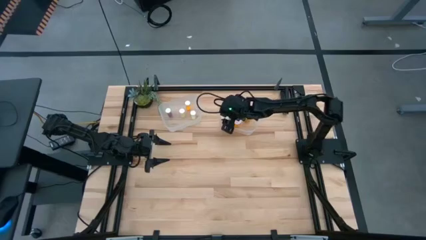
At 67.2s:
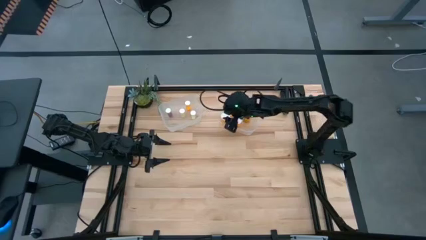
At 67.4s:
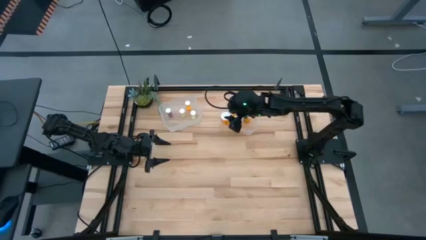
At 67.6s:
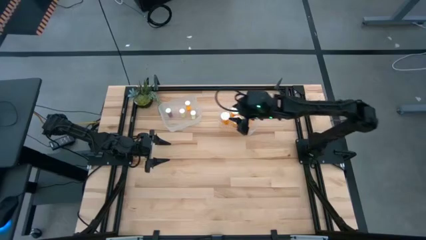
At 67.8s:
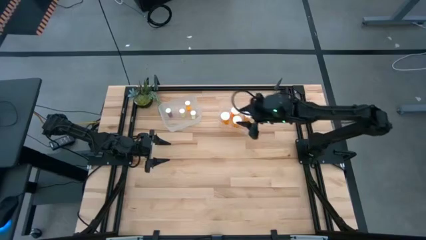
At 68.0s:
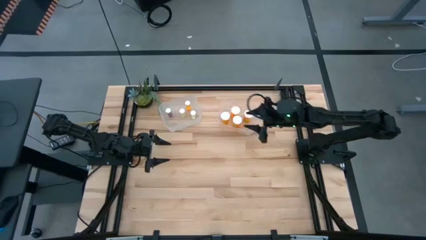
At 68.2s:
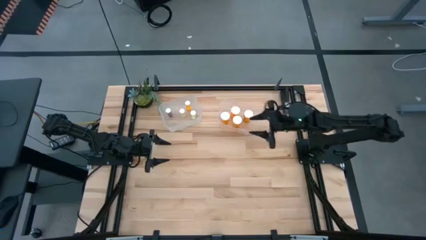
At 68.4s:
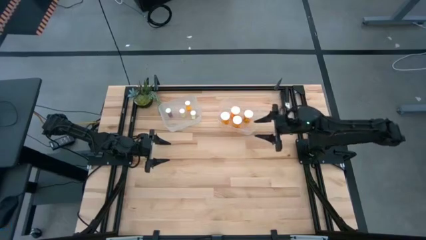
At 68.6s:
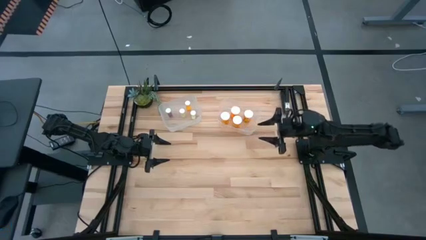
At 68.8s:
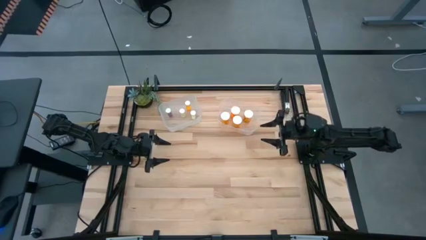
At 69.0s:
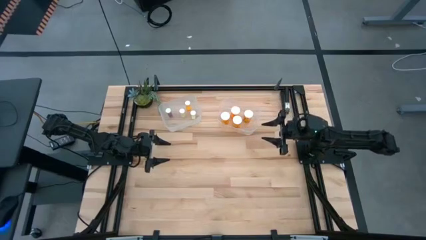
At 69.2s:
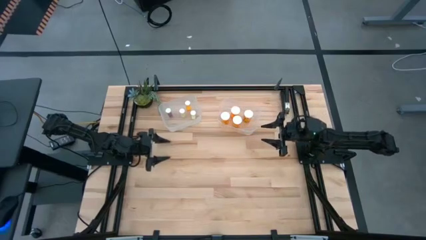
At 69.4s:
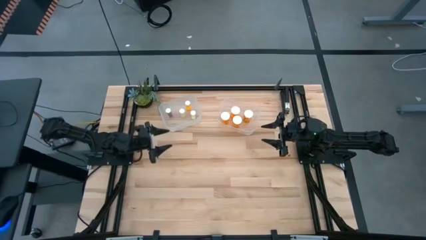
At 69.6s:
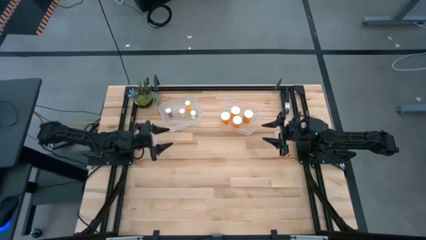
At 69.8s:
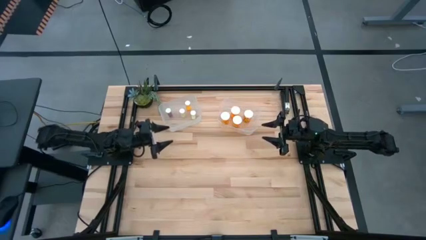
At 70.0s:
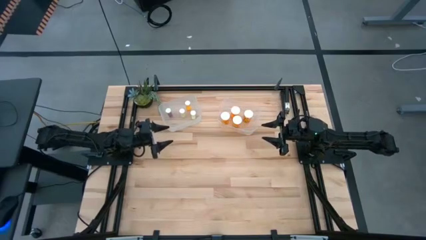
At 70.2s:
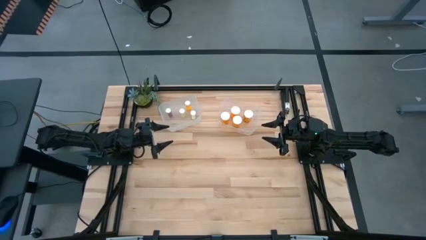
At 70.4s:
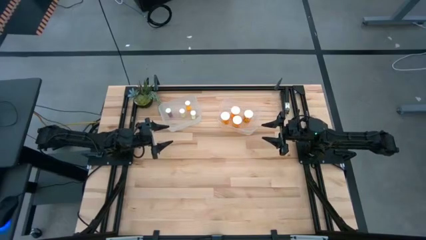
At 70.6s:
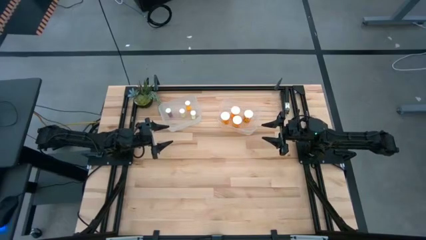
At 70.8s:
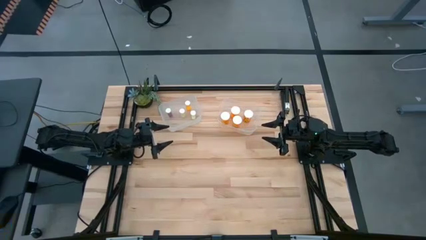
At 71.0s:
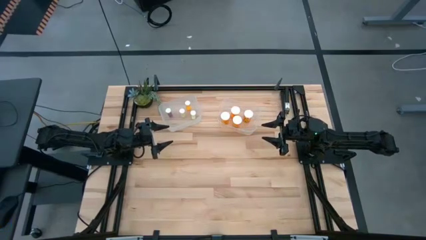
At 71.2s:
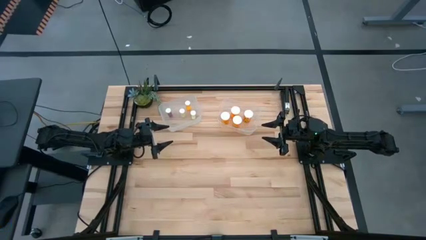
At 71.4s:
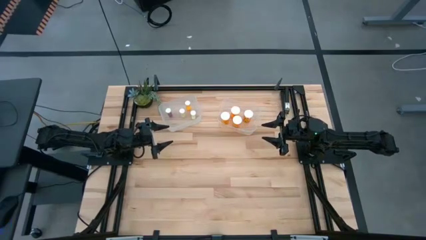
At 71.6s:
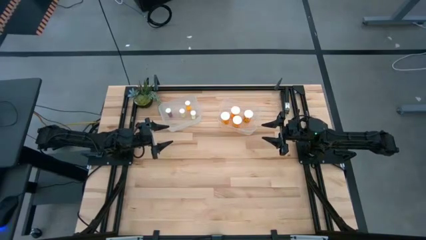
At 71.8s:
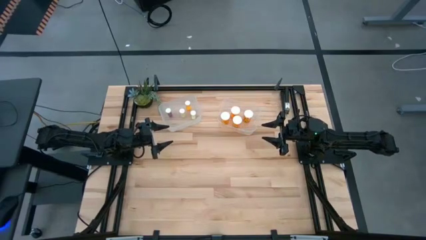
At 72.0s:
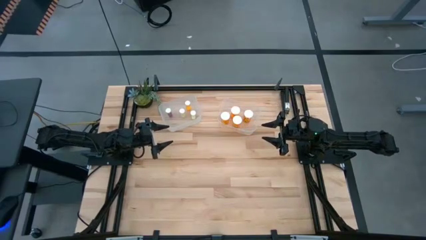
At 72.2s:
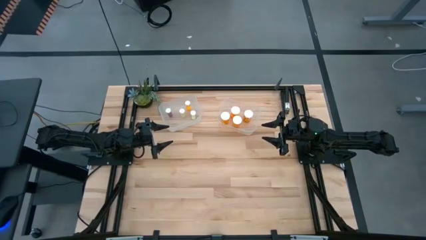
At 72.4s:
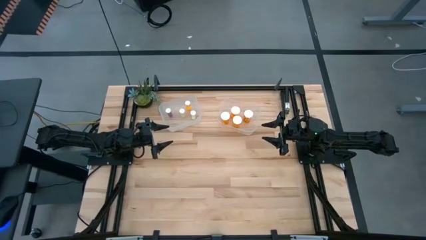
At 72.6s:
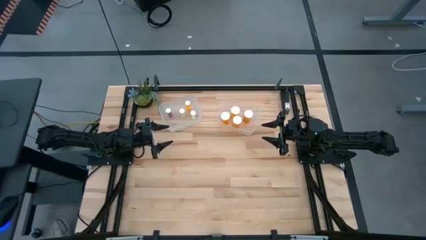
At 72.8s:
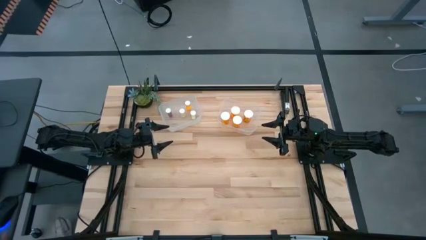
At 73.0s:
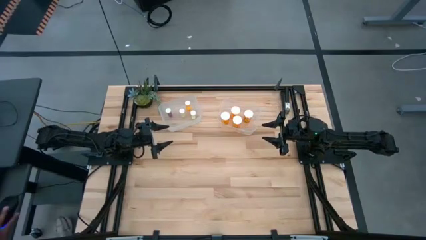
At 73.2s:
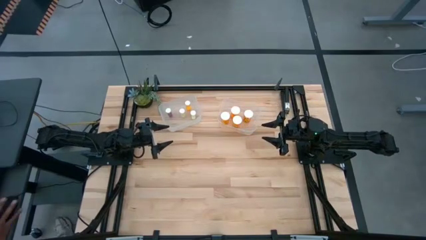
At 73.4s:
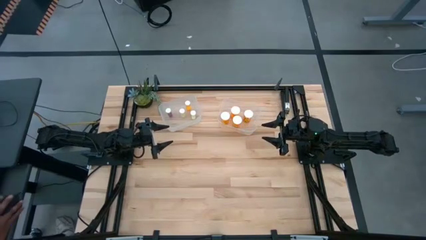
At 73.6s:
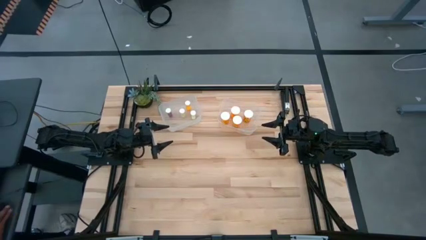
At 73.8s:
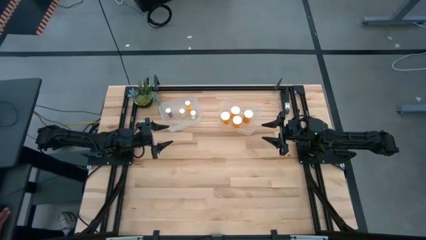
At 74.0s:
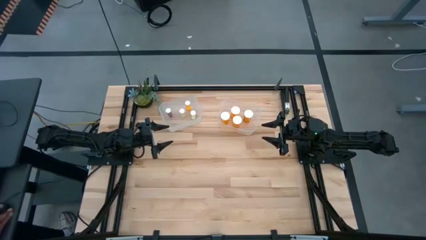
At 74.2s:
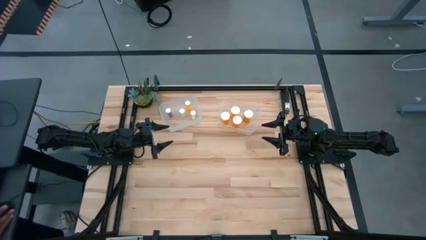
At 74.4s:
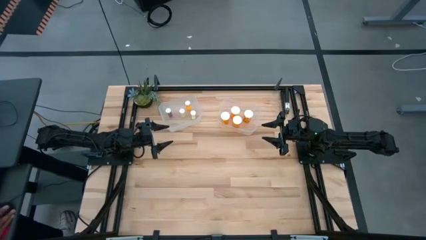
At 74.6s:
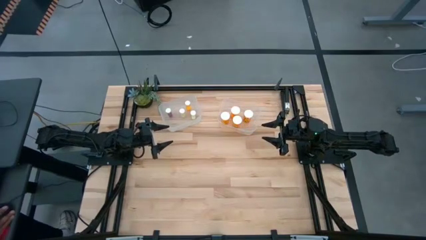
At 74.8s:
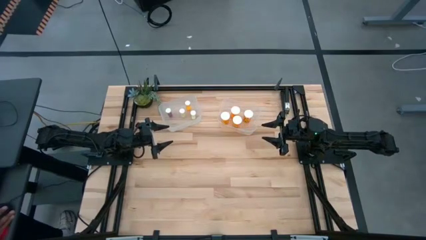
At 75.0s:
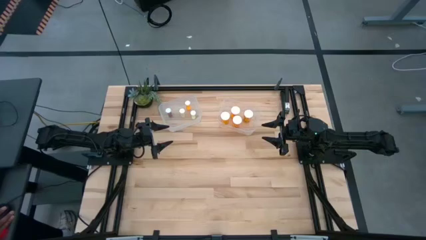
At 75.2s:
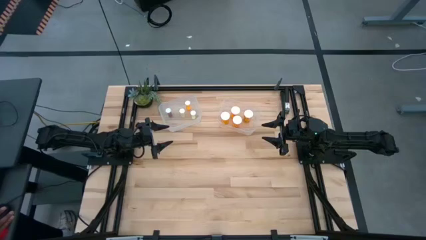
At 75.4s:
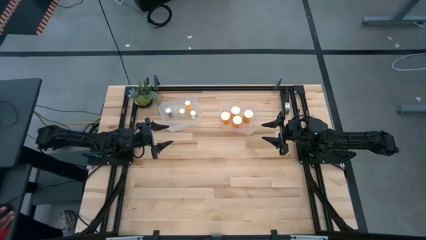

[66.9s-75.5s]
Task: Pick and place medicine bottles into bin by pill shape (circle, oval)
Return to Home Position

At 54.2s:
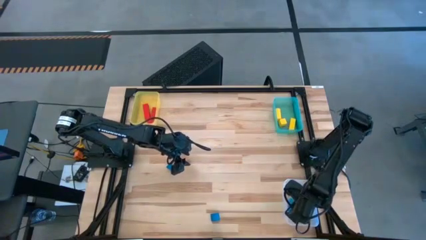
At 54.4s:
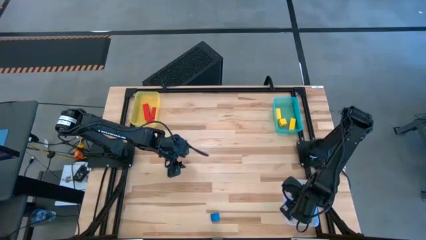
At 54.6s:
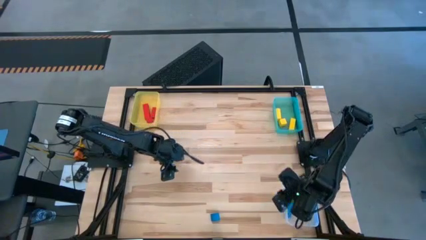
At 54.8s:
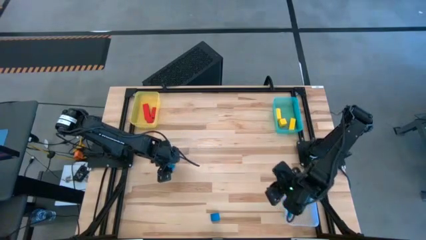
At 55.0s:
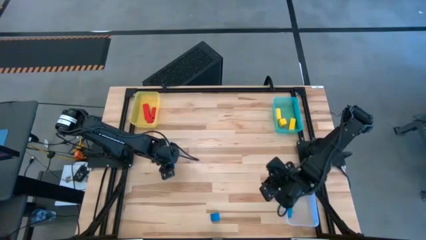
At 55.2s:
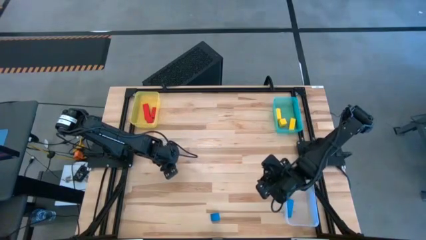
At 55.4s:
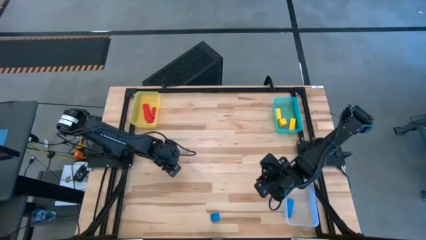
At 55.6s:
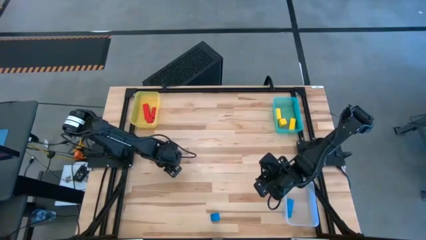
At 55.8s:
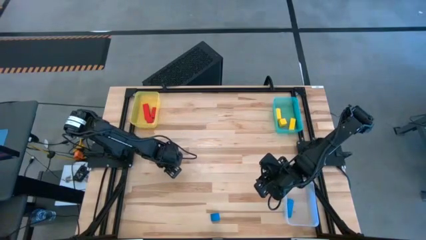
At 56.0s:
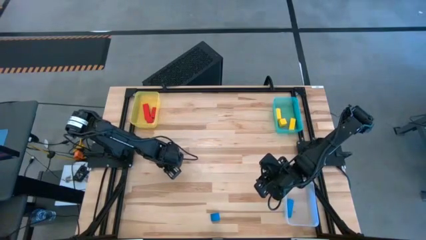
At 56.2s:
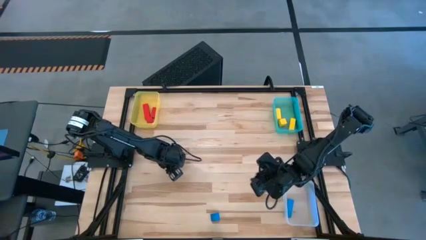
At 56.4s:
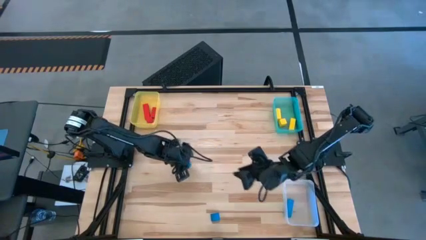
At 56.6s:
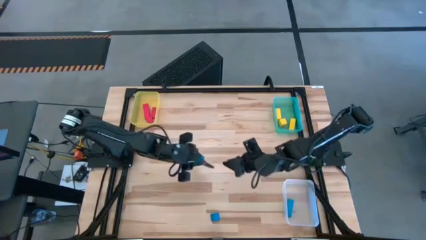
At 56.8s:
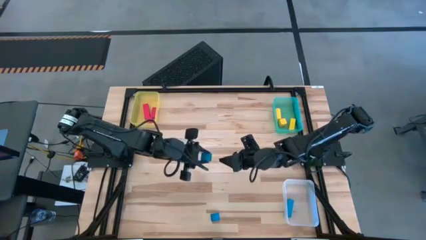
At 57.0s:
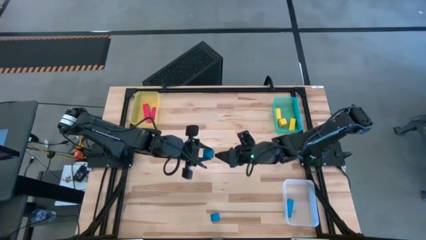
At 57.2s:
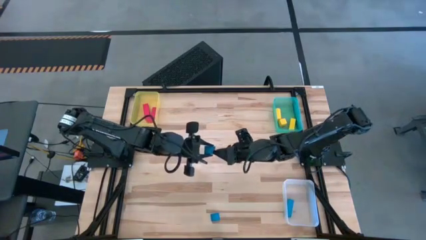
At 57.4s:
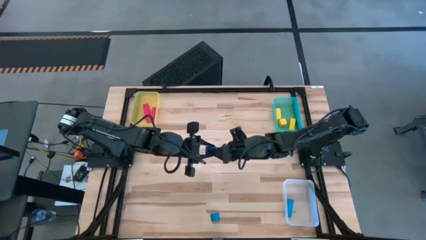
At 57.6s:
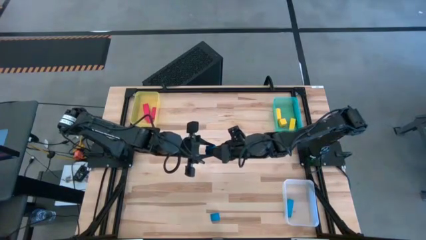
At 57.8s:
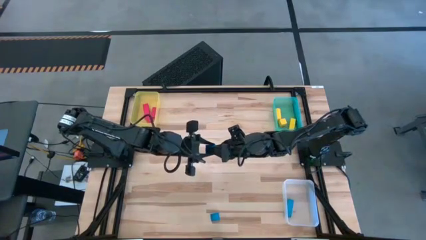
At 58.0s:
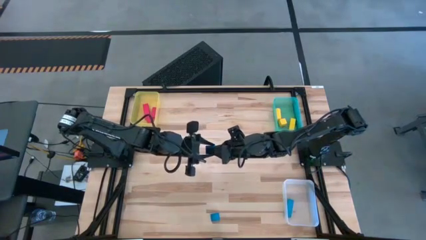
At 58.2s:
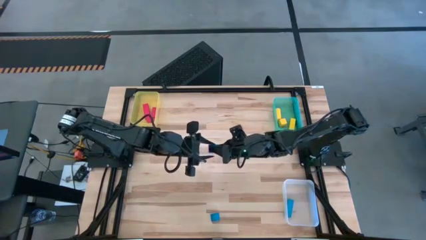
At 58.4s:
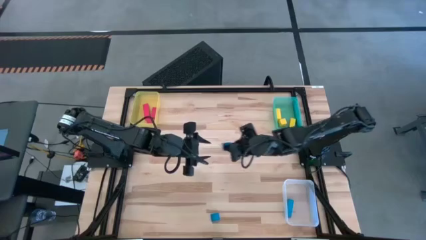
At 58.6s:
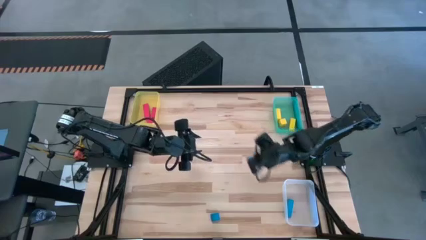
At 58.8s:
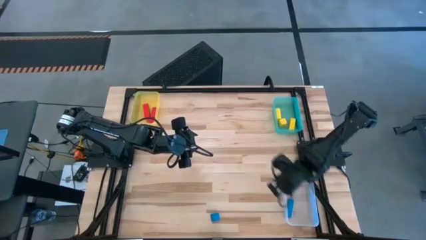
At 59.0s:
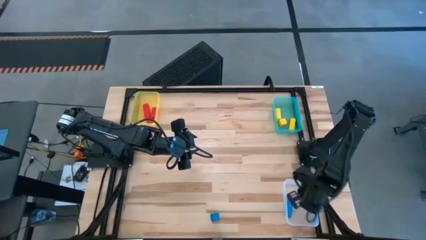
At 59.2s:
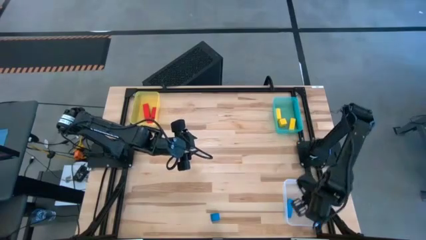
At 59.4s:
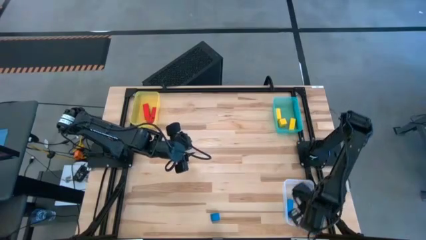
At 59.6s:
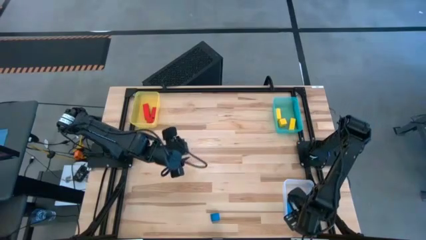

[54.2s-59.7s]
Task: Sort & place blocks by color
Put the top blue block into the transparent bin

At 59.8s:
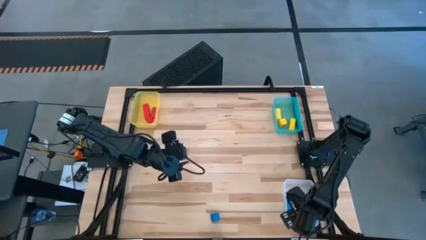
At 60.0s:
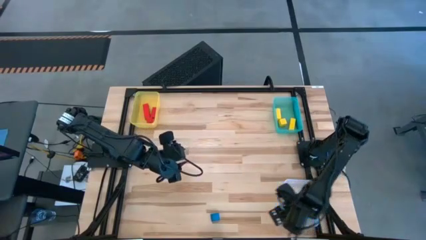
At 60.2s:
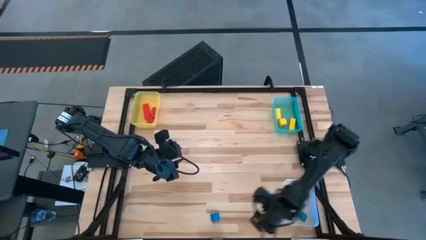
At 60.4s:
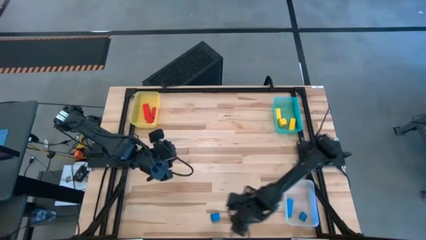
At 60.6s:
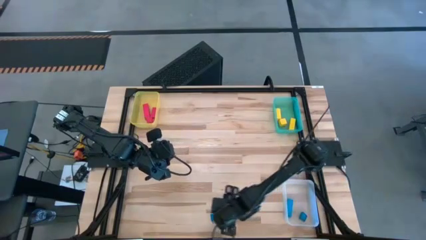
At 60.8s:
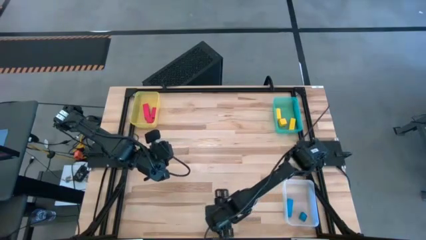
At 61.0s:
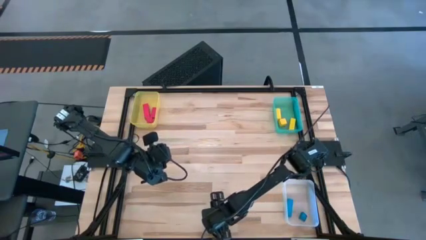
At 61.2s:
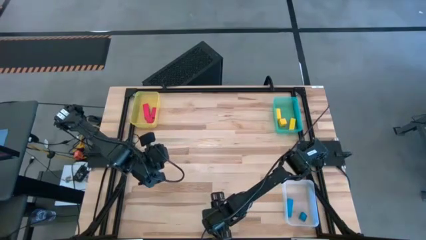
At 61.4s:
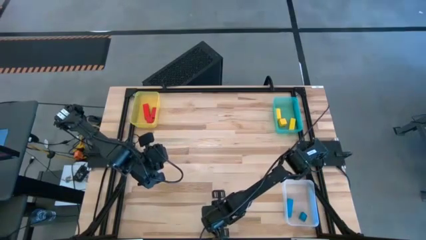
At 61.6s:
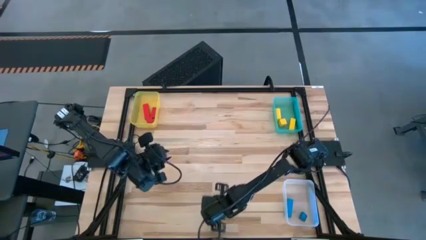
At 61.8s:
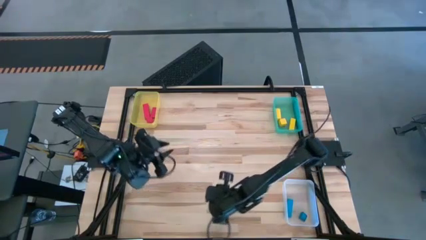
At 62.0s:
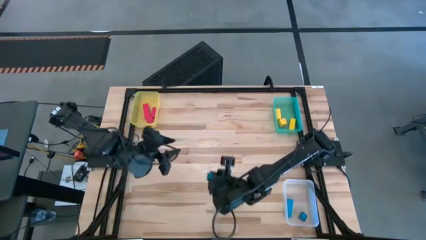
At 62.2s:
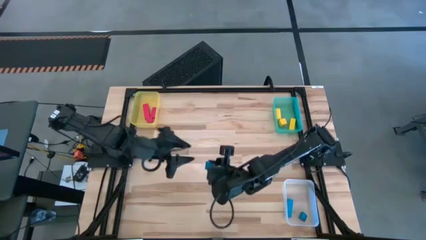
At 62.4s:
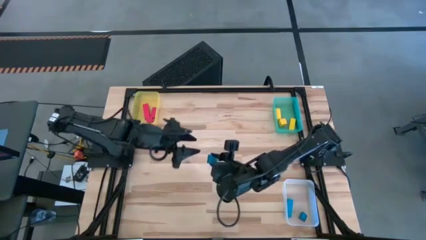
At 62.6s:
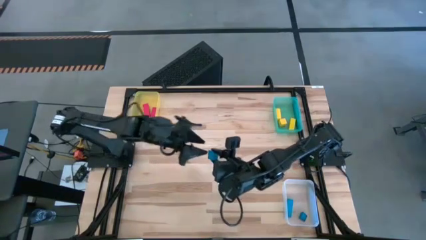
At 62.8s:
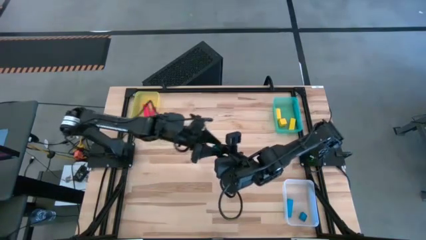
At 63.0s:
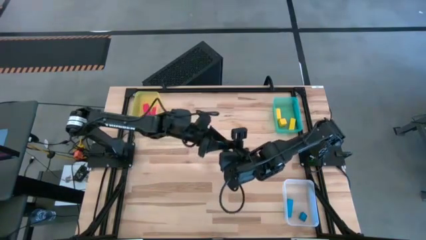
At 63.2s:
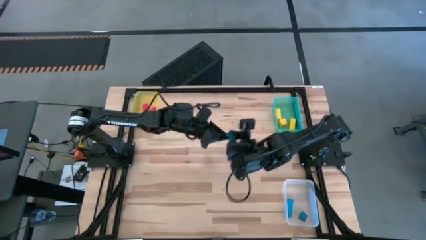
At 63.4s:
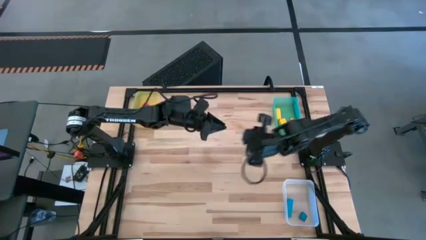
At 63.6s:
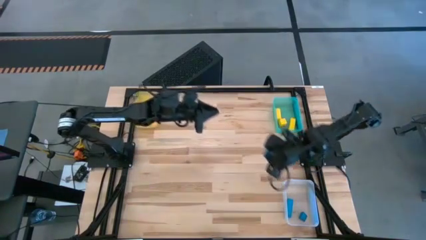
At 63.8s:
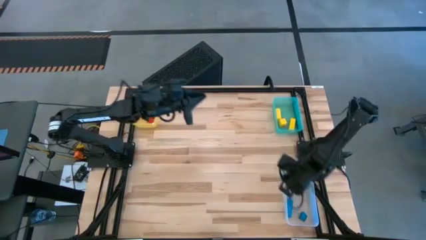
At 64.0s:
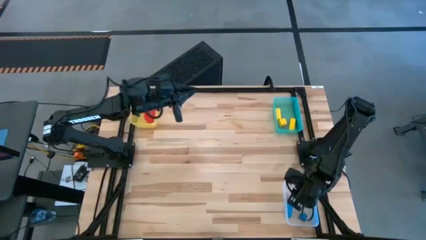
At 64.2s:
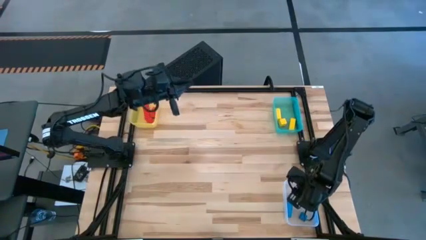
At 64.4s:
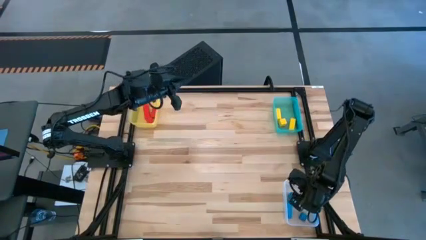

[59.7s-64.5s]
Put the blue block into the transparent bin
